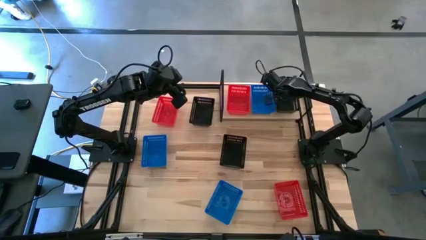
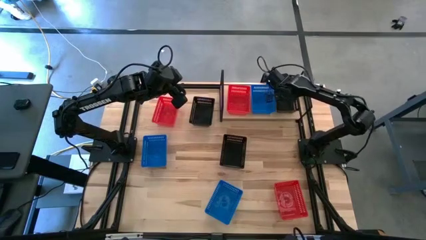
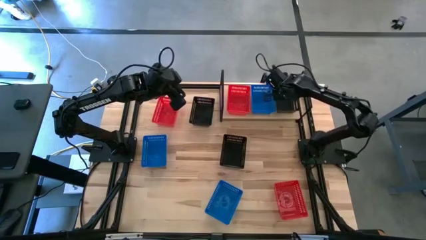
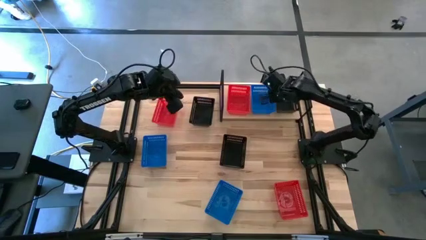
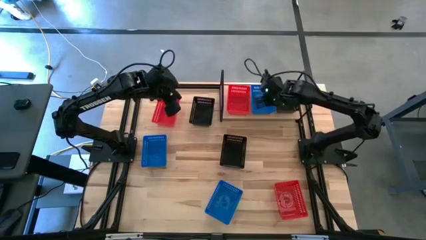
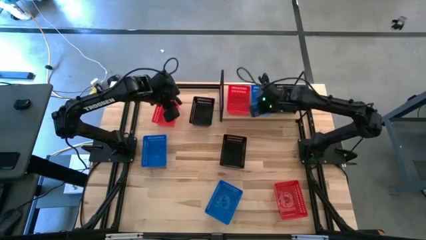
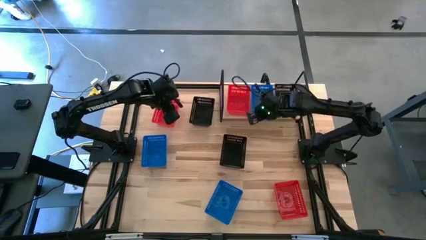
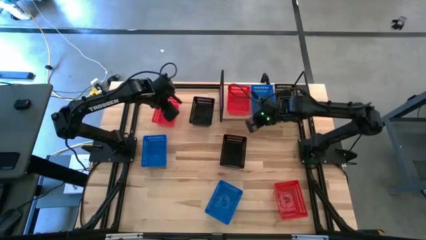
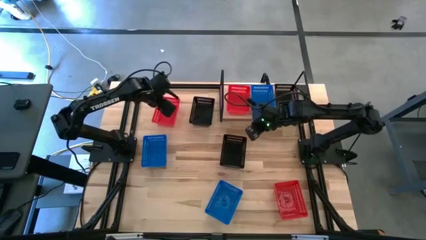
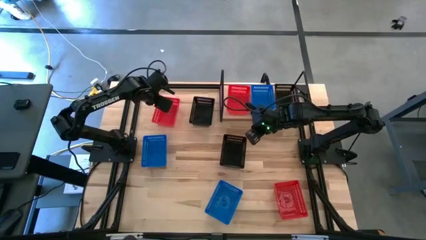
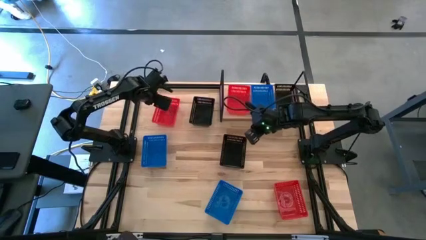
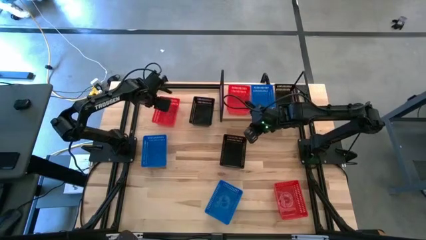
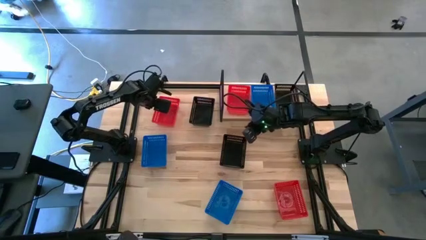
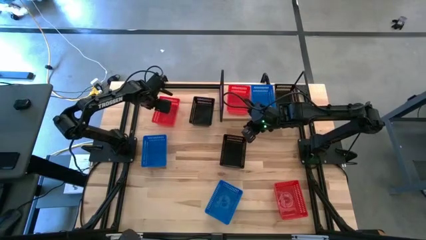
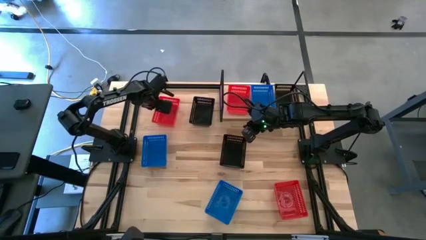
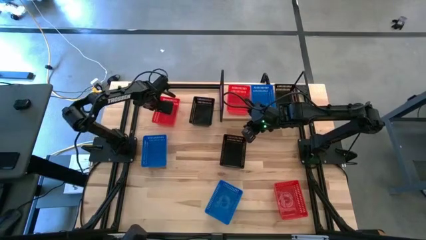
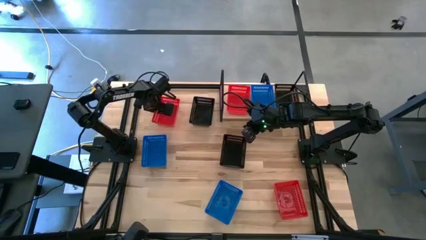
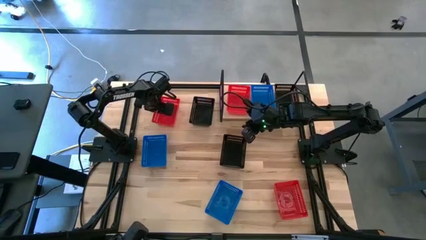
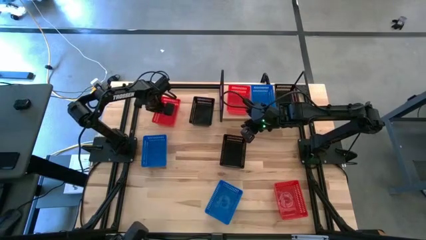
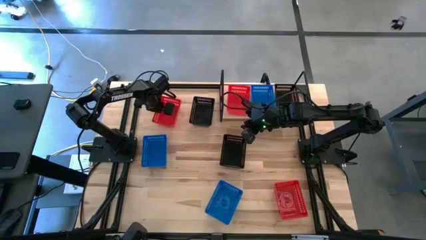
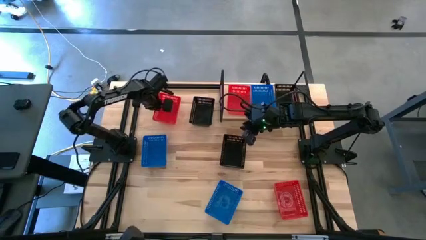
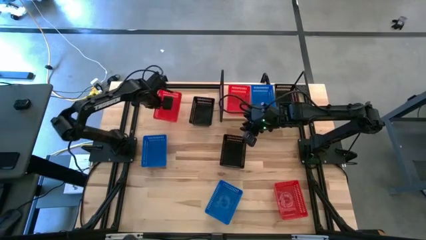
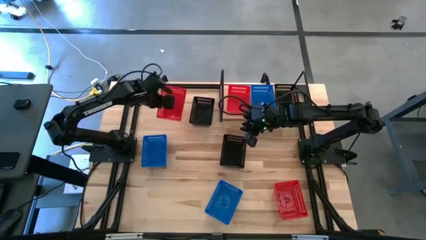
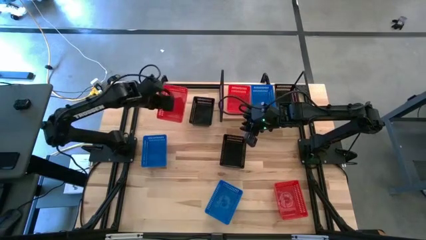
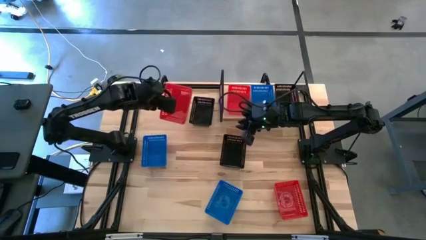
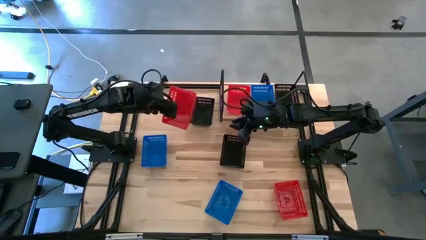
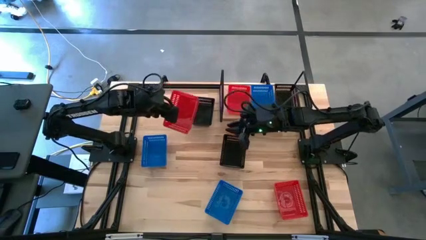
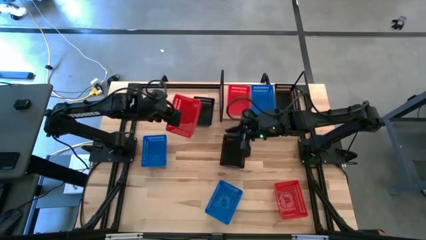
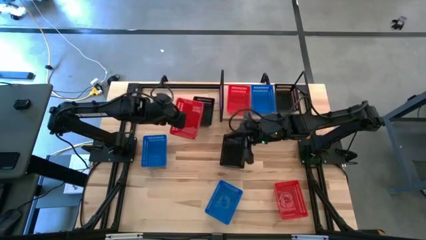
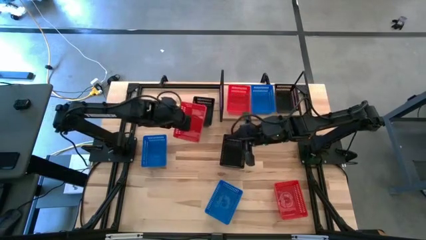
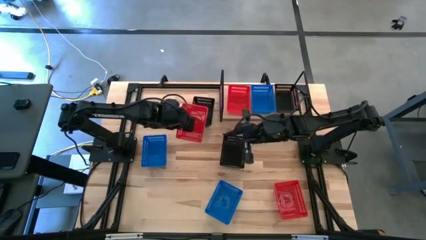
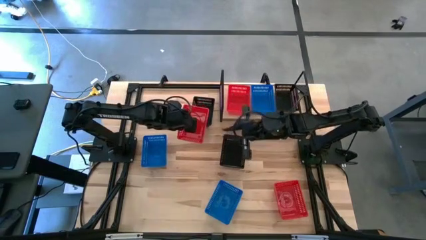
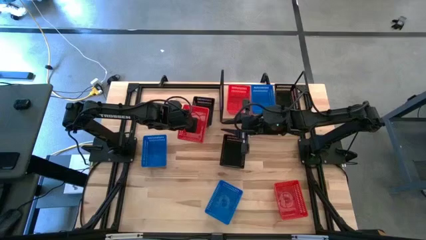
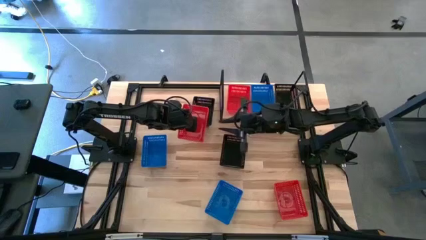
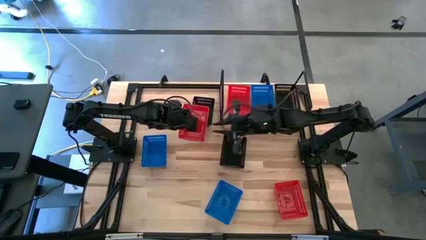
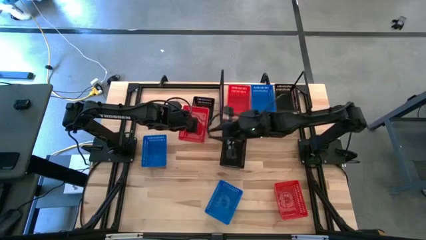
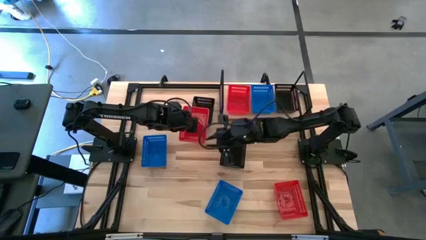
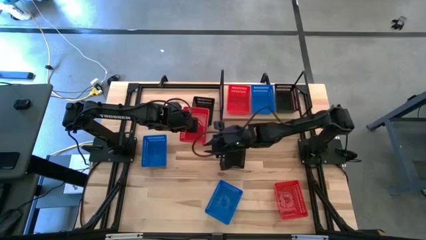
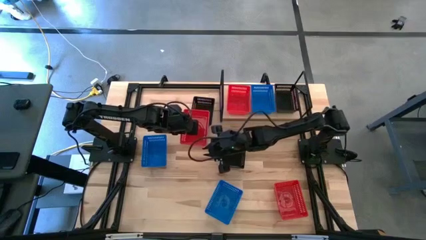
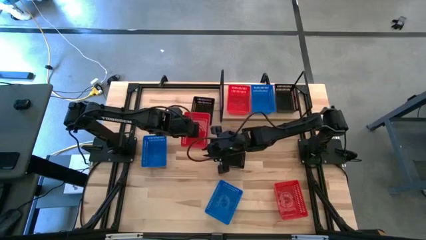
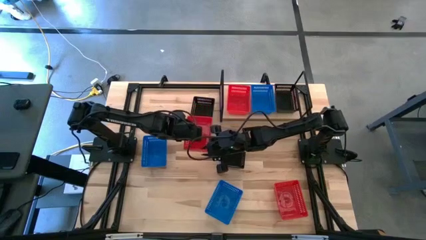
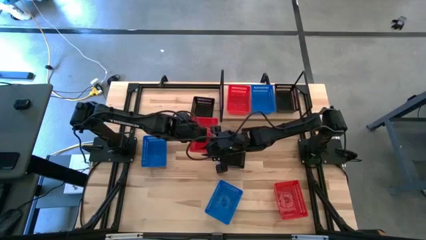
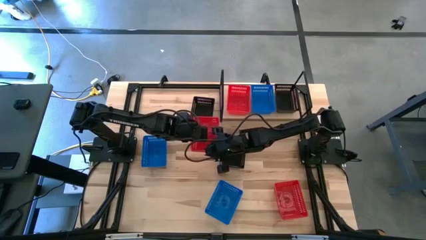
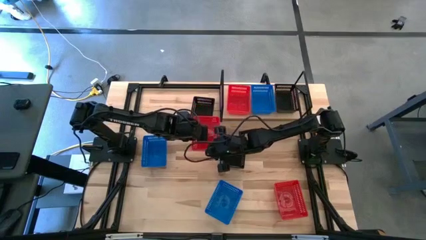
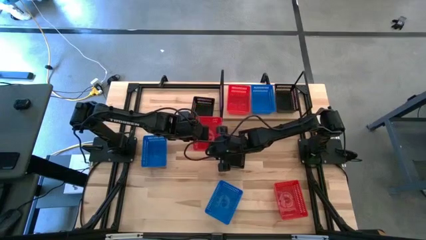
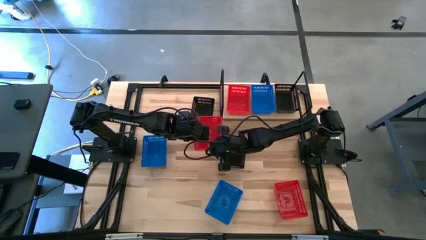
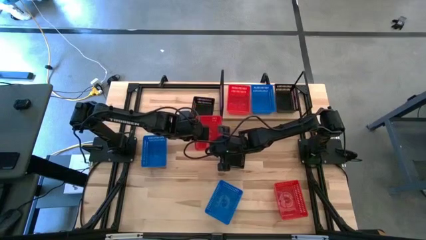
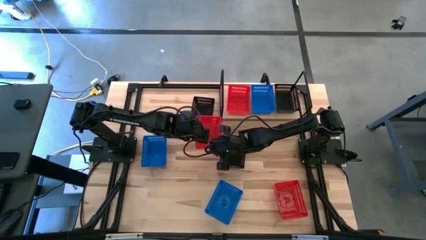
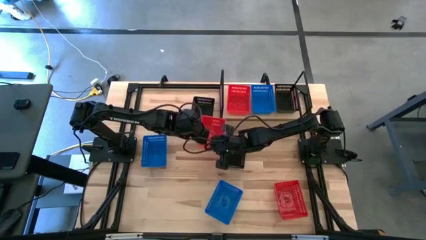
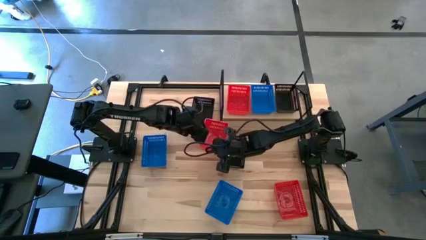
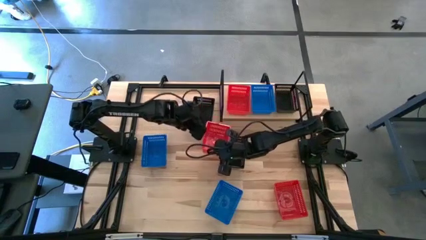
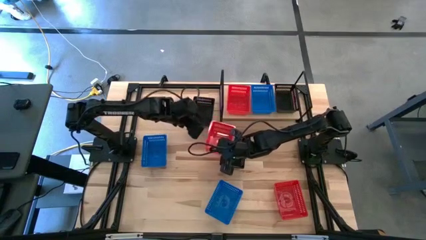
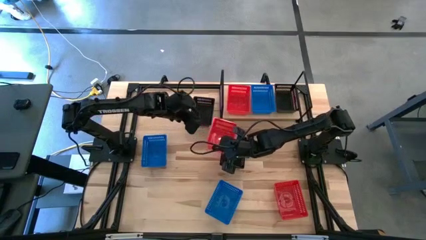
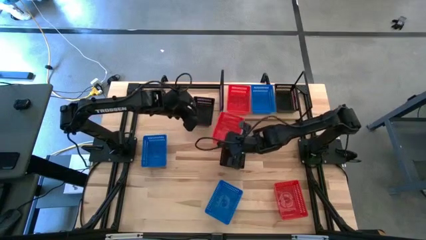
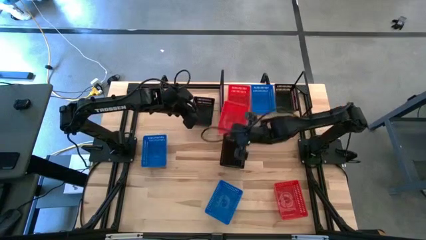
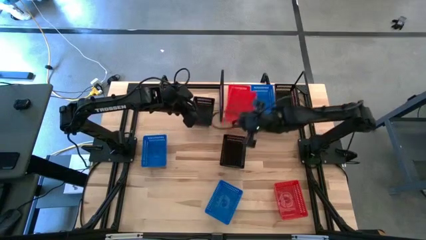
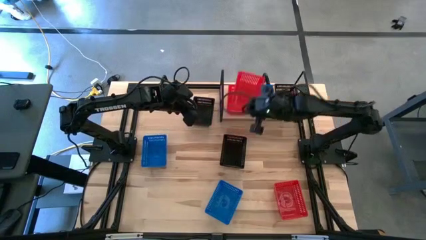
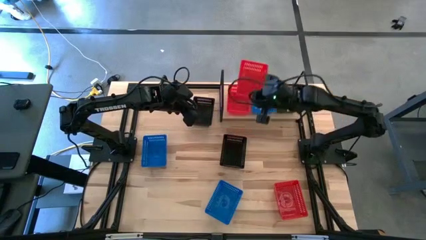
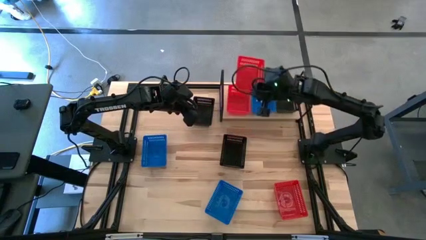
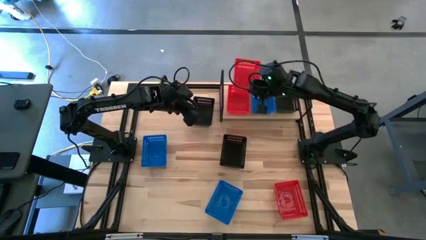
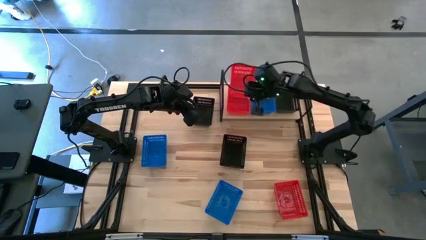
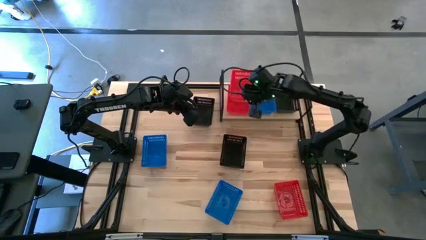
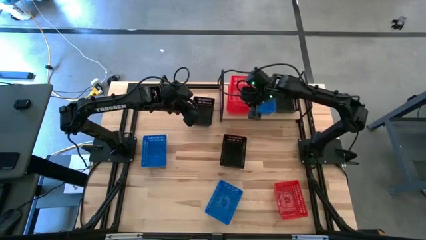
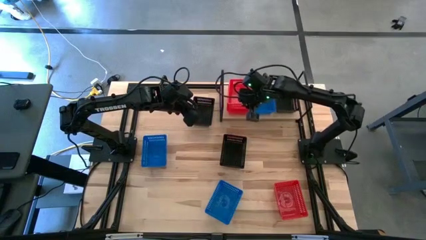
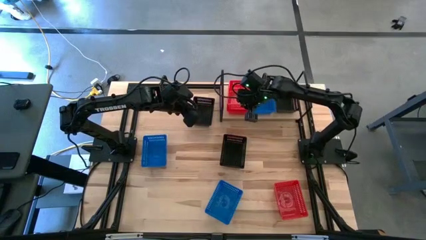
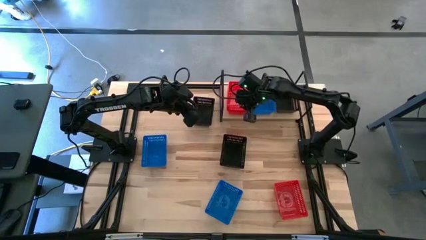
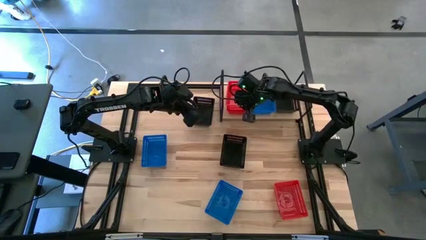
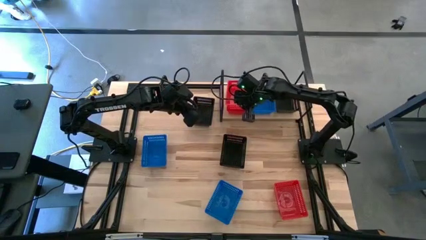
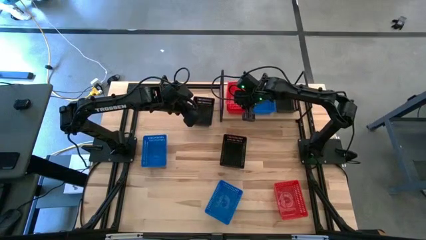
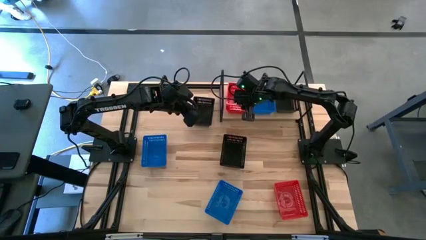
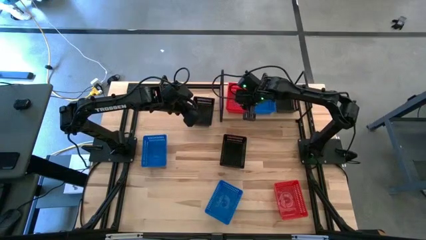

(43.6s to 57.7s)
Task: Stack baskets on shelf by color
Stack the top red bin on the other red bin on the shelf

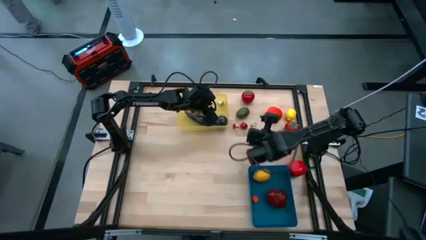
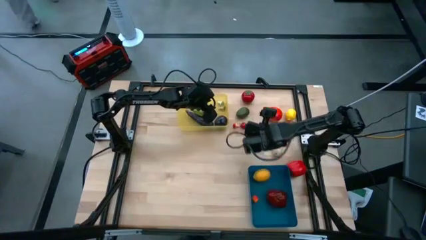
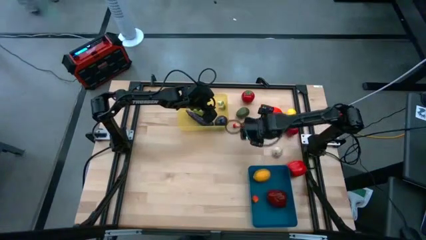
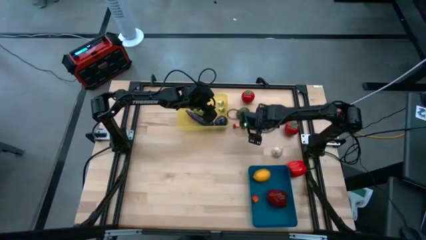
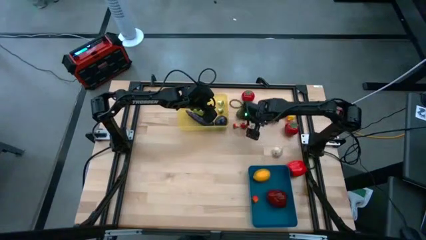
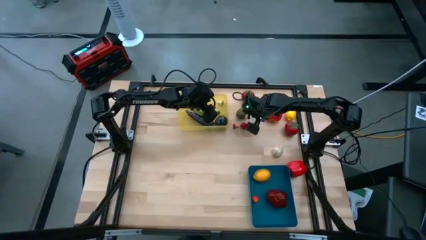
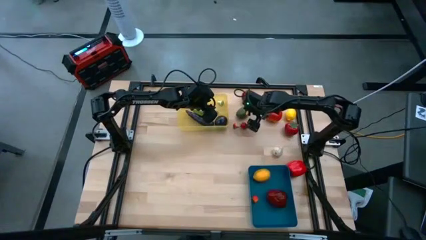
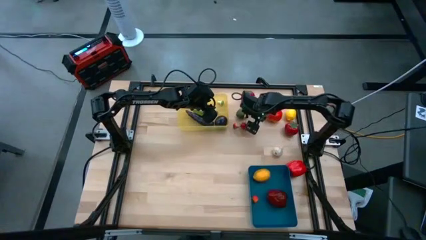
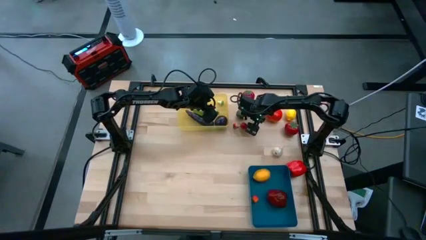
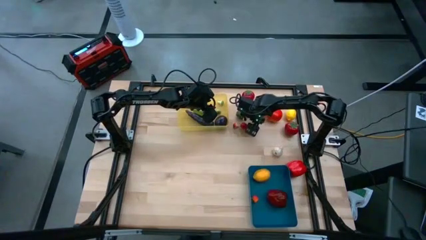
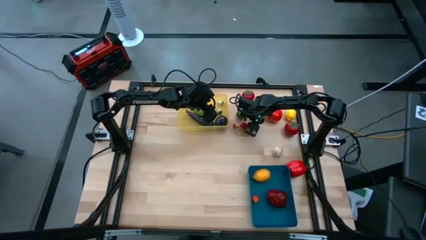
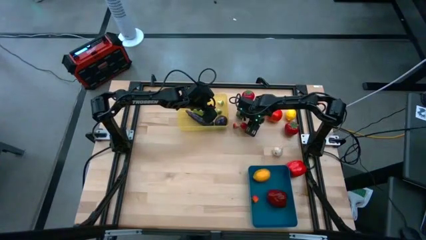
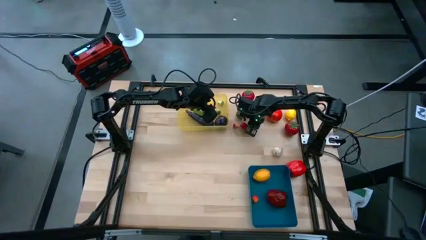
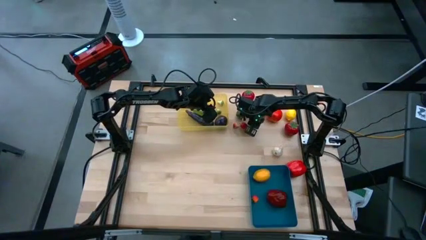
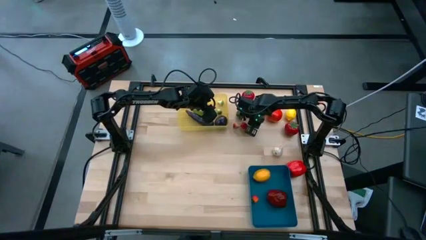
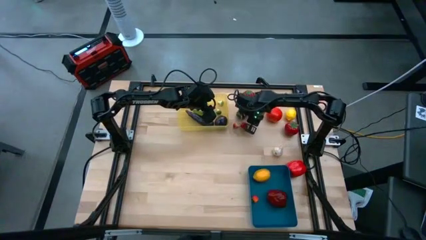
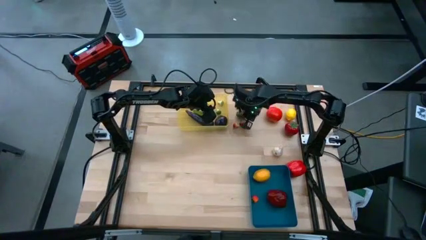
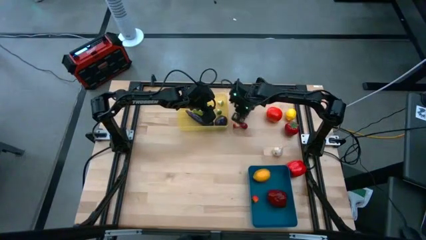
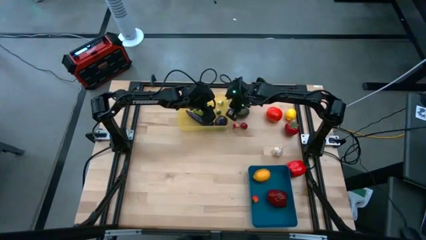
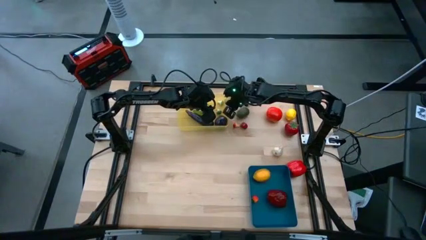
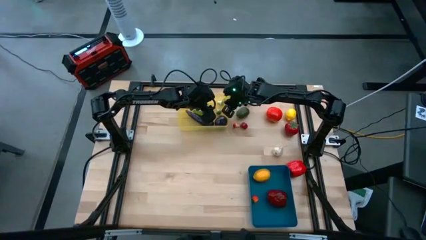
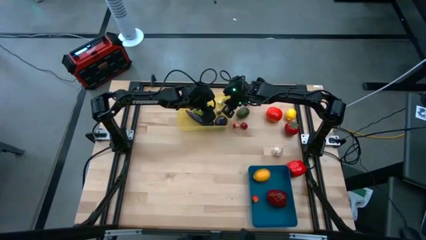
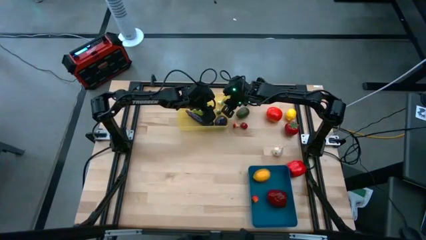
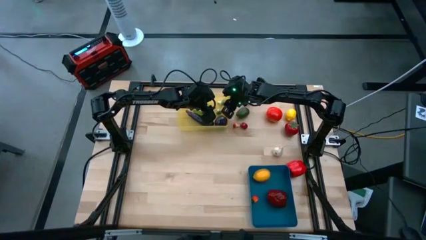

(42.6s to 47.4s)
Task: Sort produce into baskets
Put the green mushroom into the yellow bin
